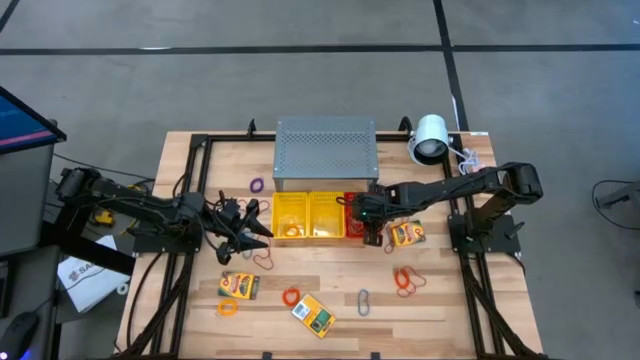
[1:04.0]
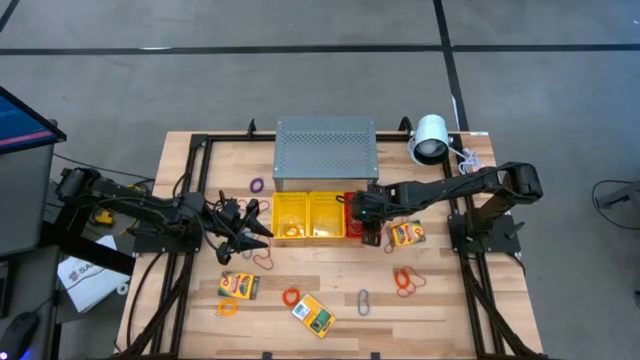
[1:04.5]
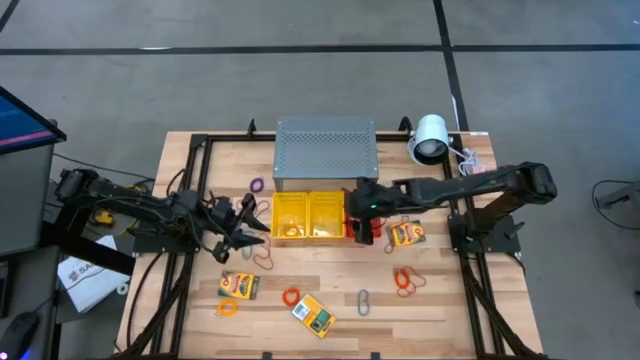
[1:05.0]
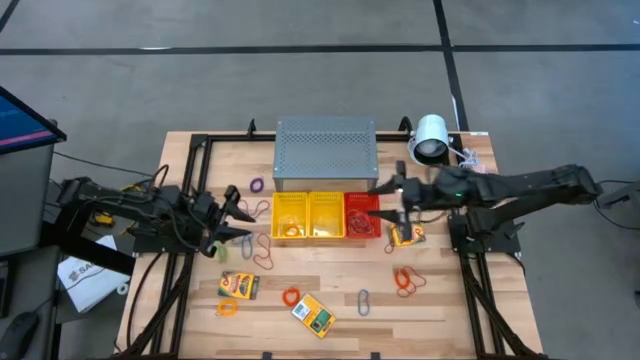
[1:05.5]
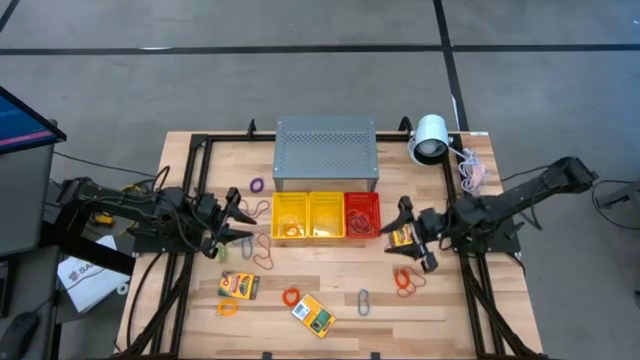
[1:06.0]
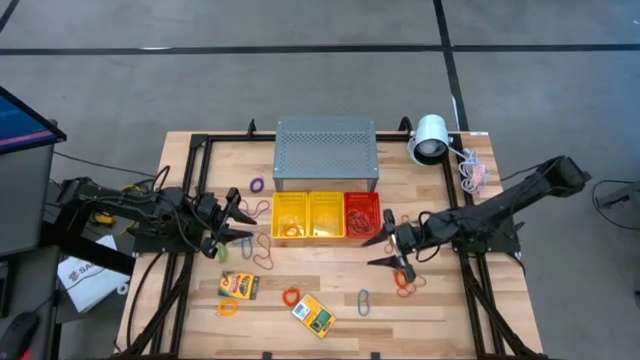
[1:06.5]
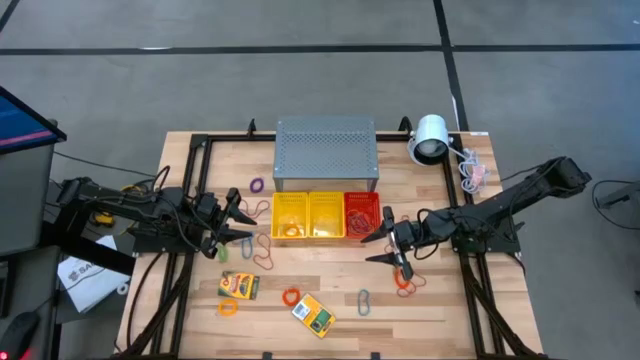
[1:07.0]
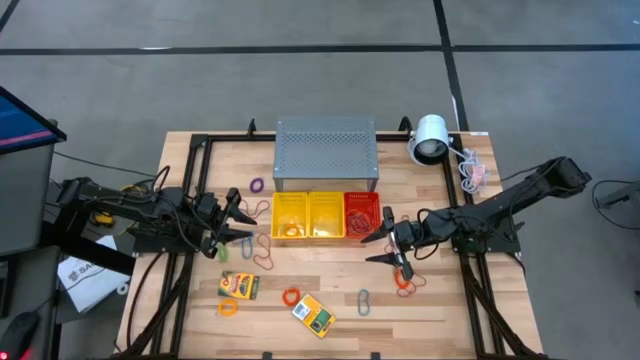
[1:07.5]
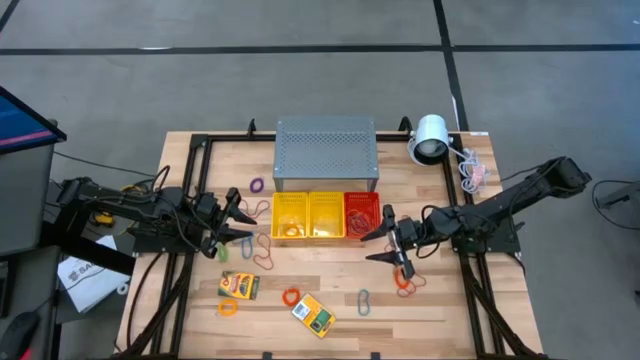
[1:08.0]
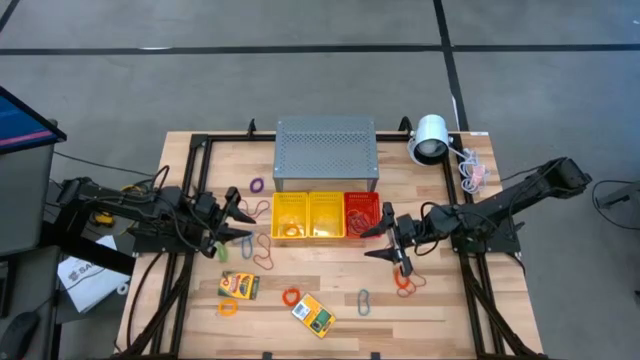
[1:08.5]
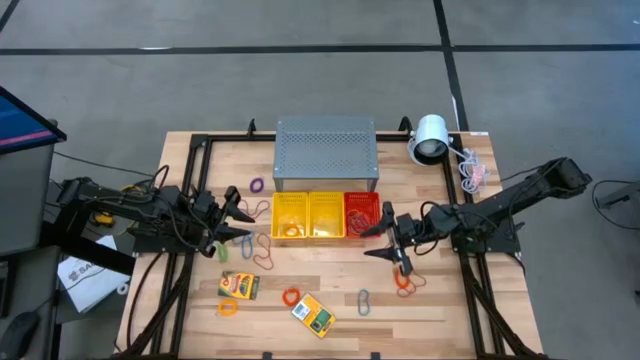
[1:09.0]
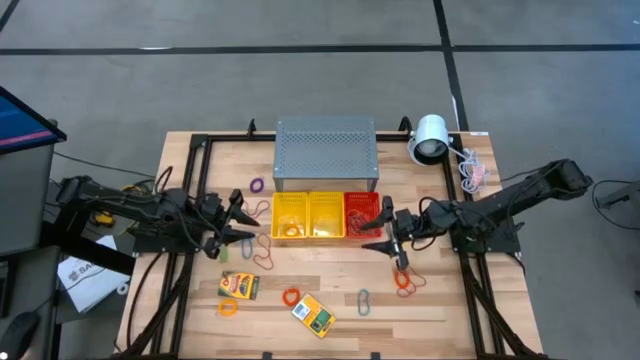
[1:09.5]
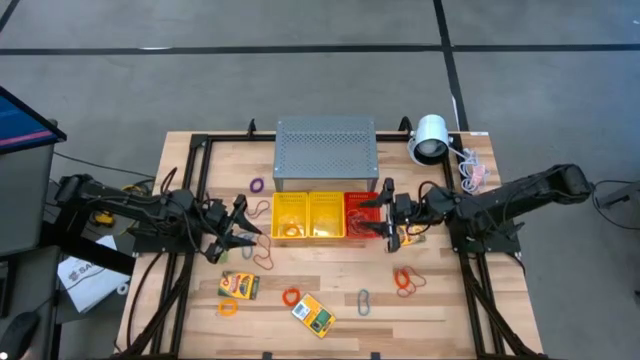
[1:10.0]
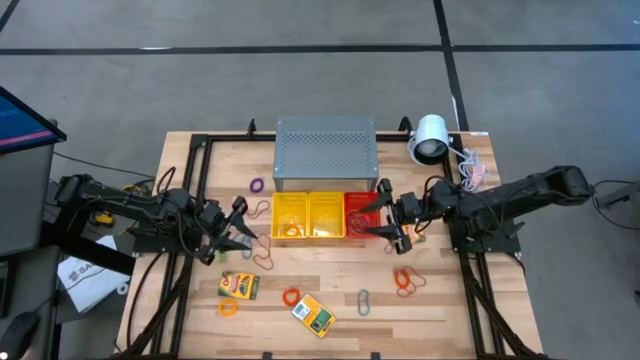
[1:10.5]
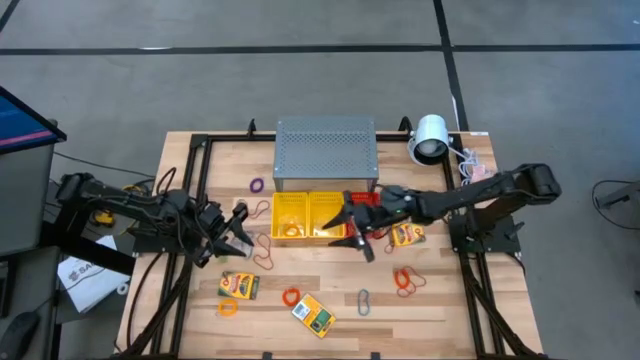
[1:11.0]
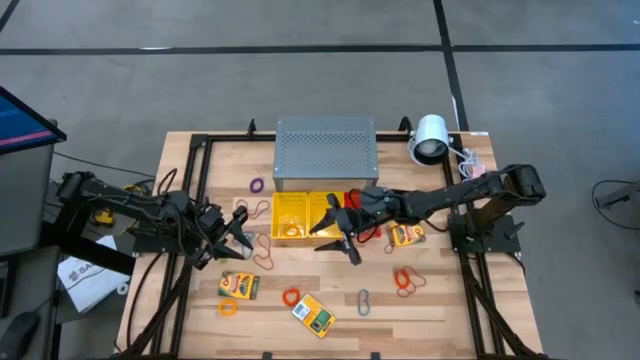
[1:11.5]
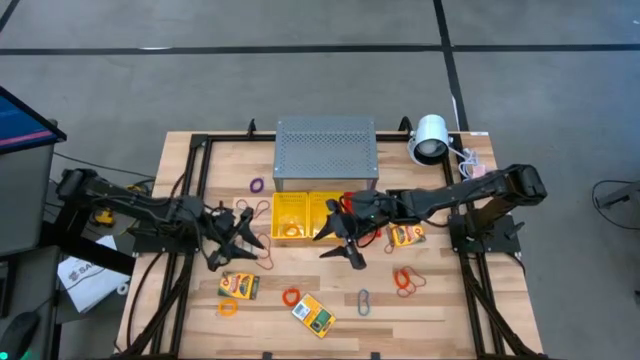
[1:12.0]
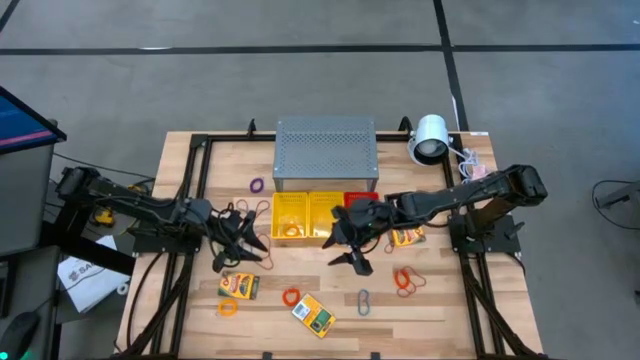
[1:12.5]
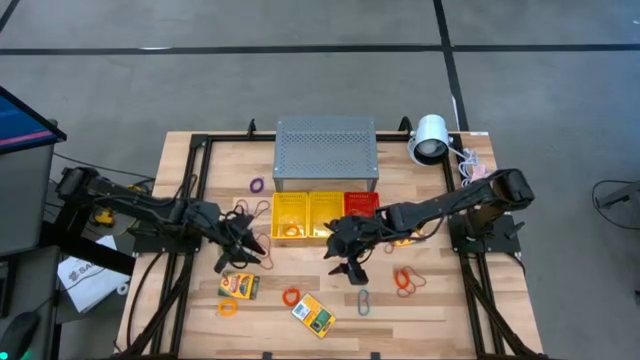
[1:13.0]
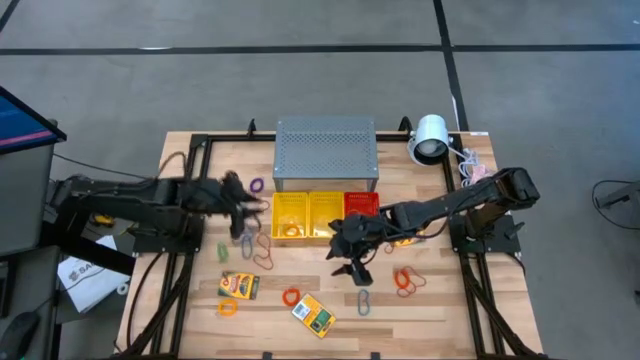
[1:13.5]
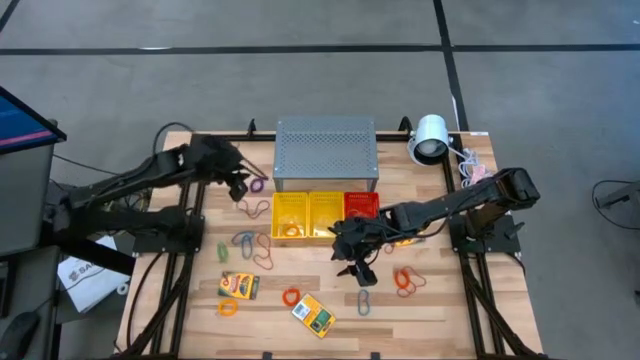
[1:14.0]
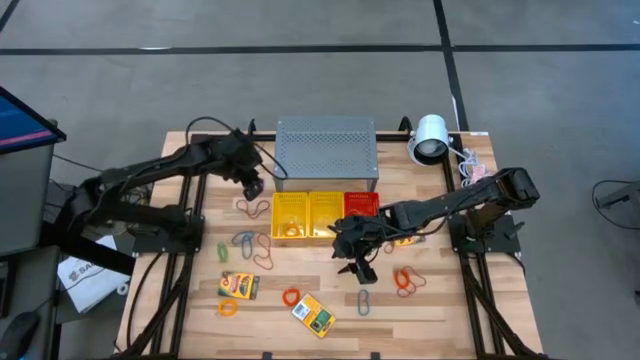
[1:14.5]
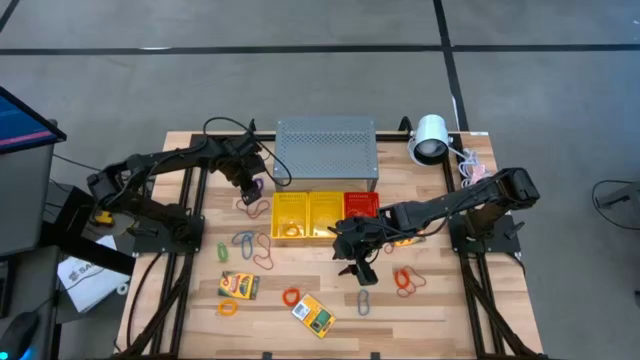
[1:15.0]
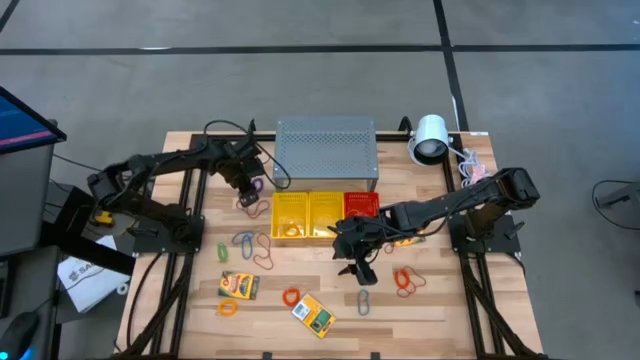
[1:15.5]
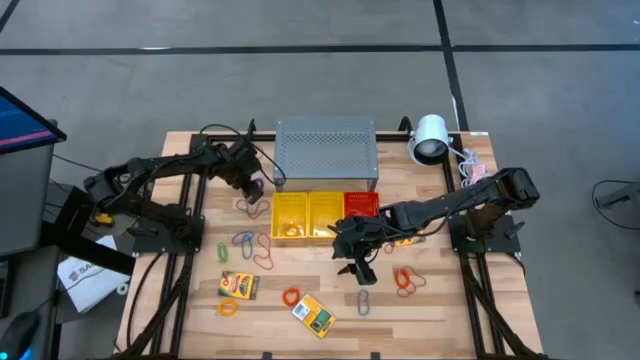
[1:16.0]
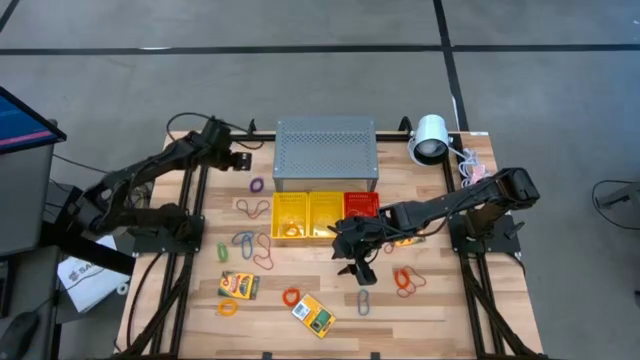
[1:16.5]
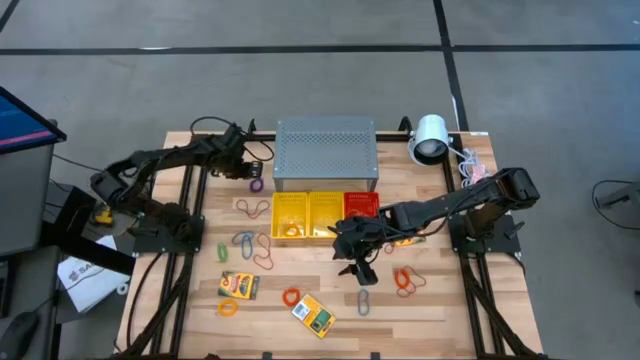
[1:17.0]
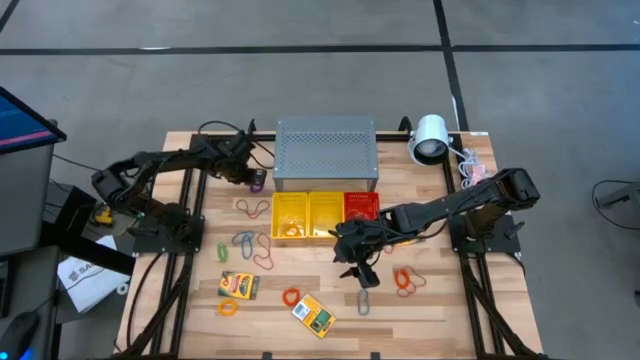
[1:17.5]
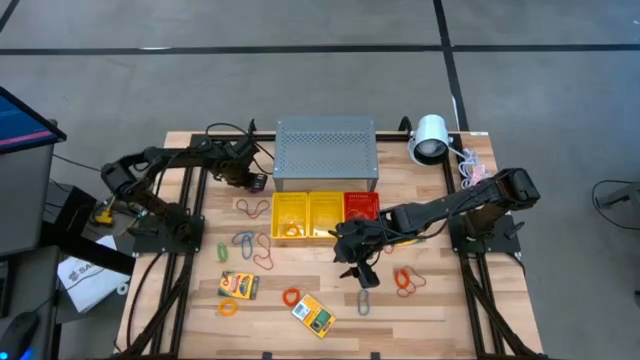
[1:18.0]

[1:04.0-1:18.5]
Task: Pick & Place Office Desk Supplies
Put the violet spring keychain into the left yellow bin

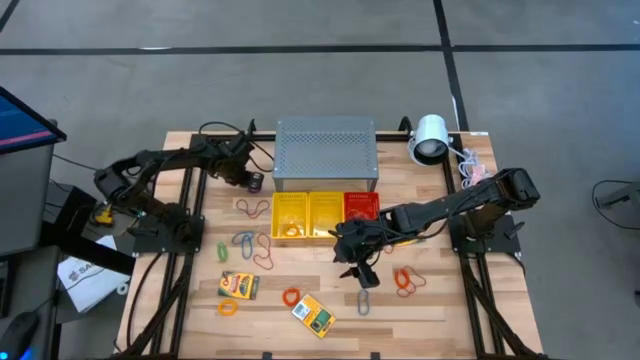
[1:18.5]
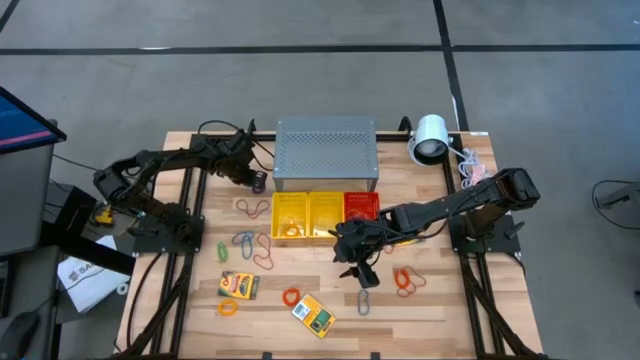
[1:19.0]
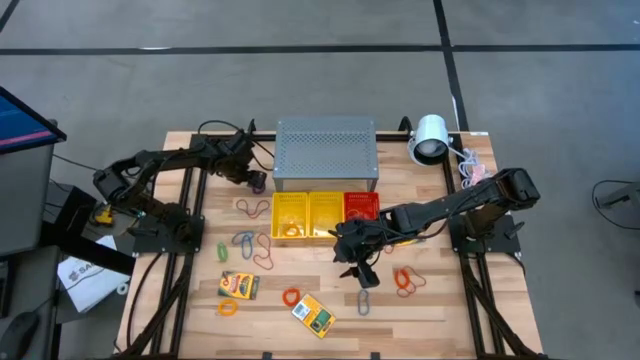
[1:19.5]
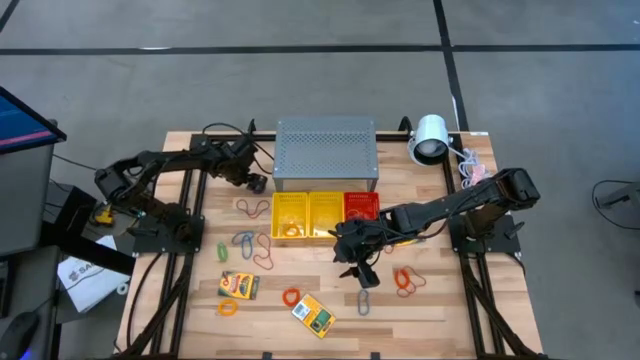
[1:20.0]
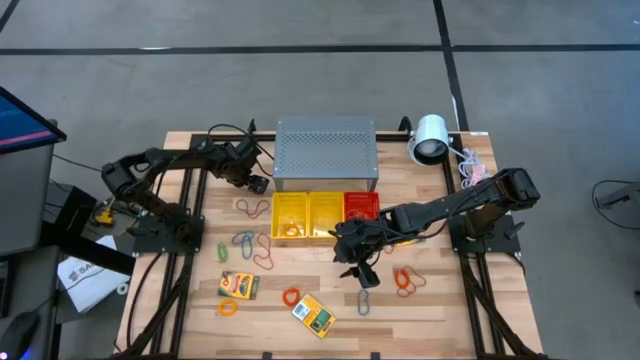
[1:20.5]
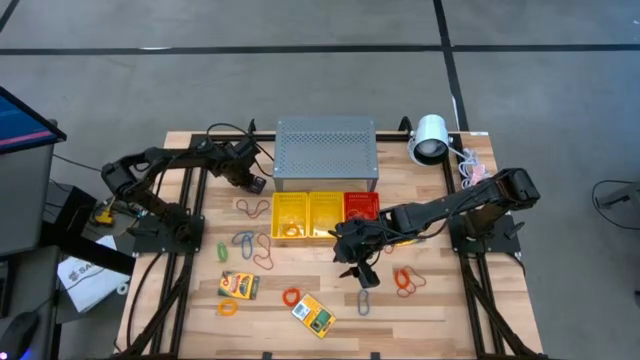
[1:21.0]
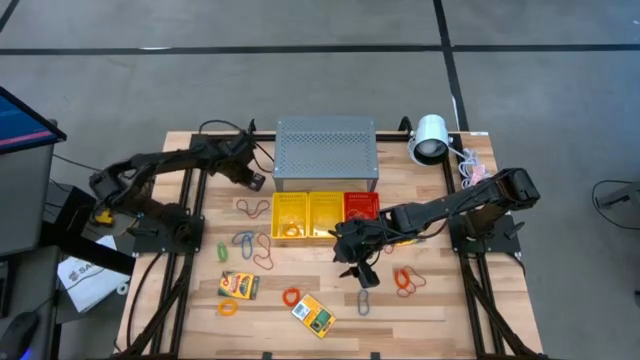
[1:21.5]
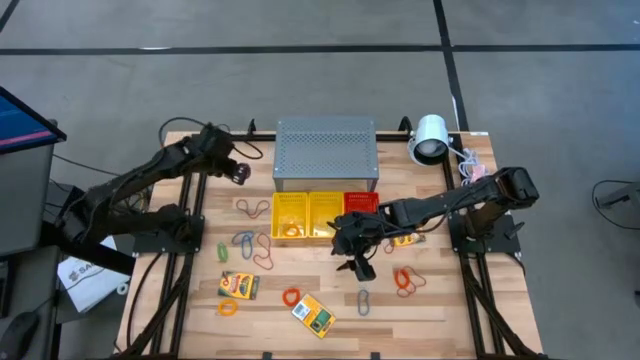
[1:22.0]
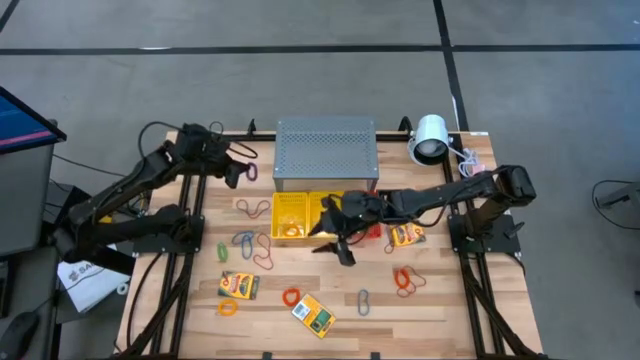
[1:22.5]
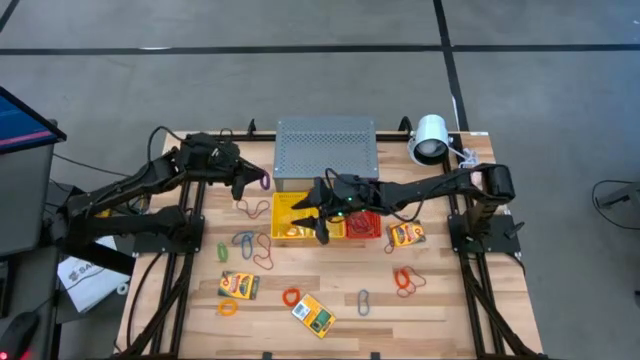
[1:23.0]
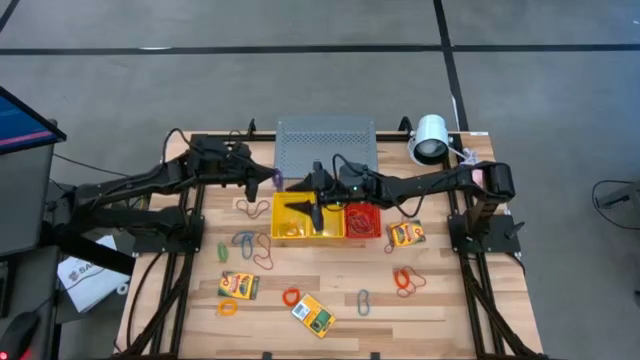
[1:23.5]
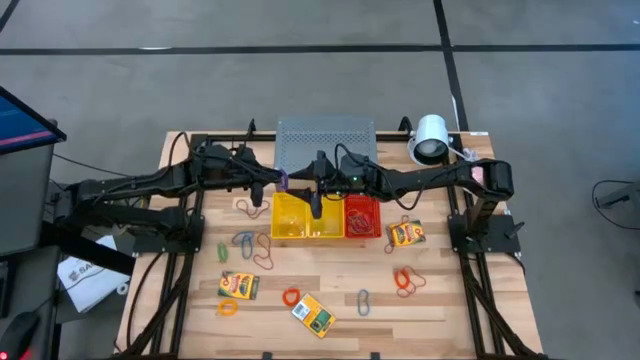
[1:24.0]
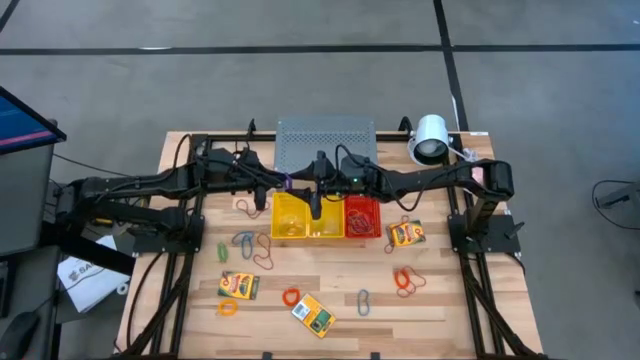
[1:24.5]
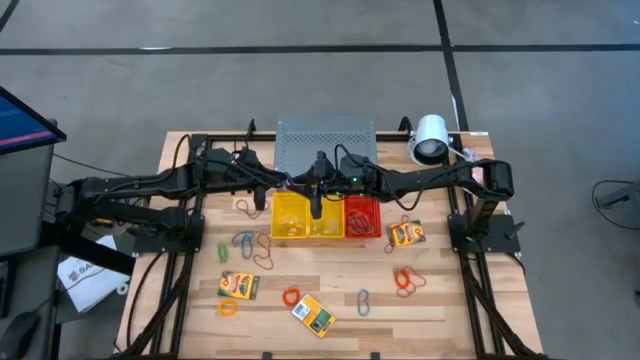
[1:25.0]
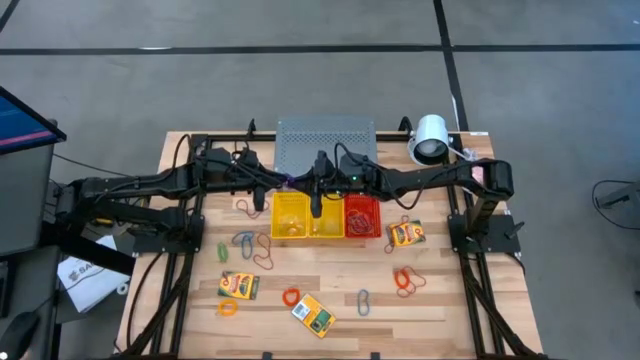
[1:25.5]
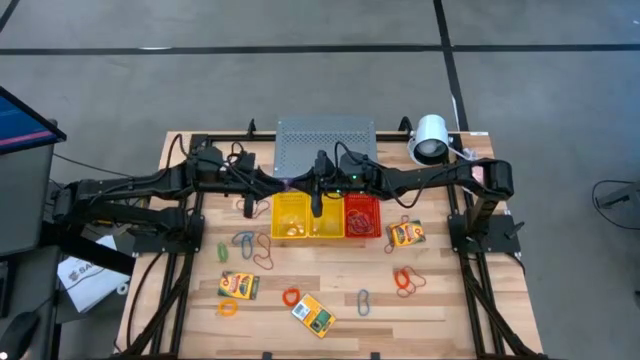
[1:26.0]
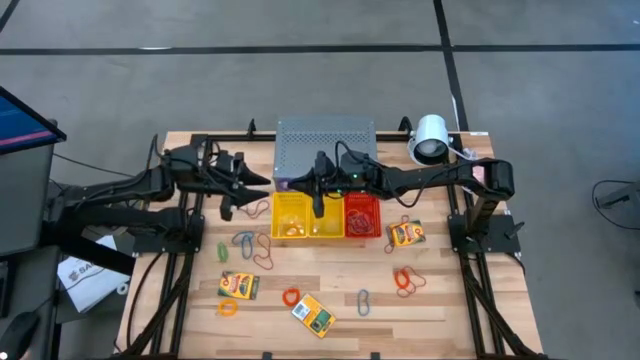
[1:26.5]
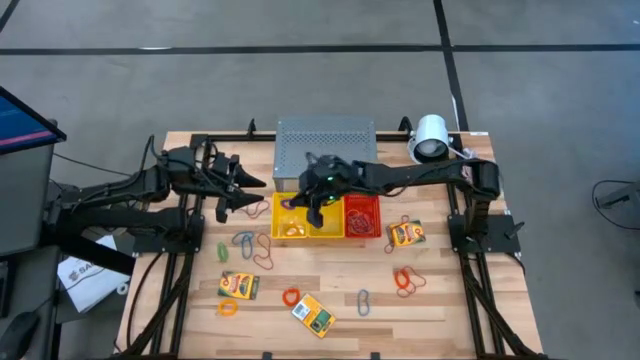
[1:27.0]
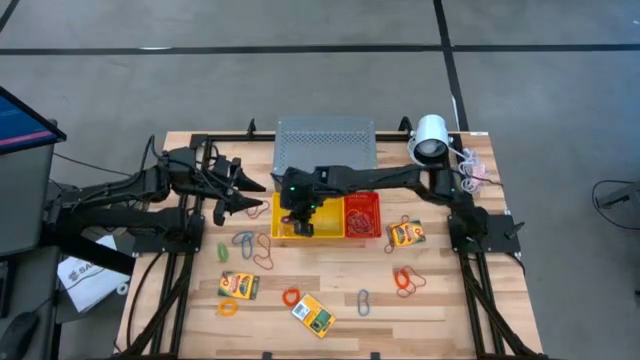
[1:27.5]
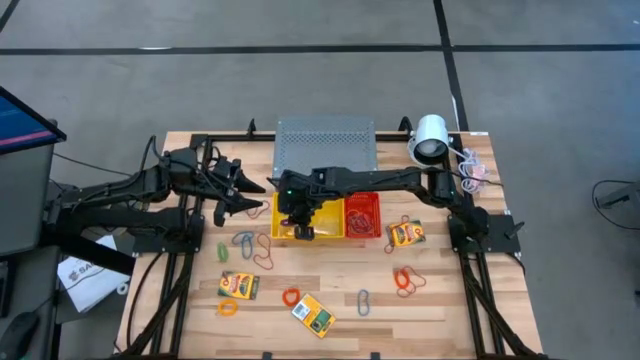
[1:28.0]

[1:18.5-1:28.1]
Put the violet spring keychain into the left yellow bin
